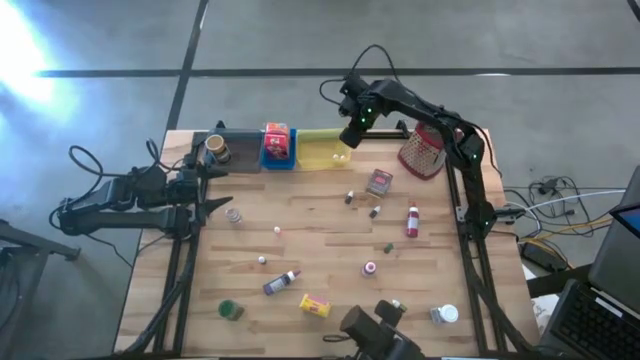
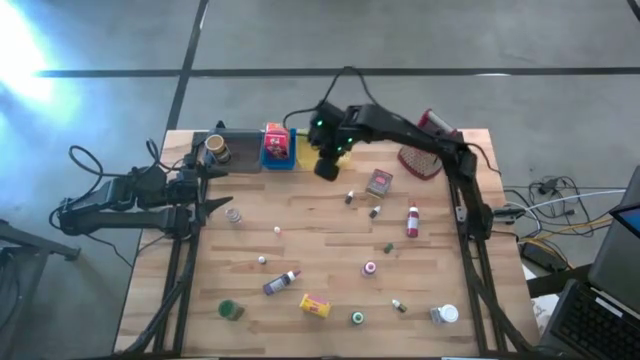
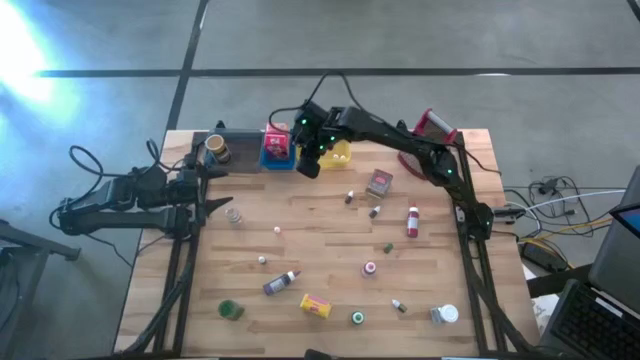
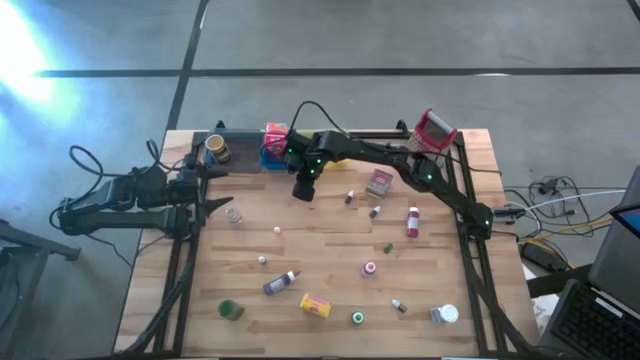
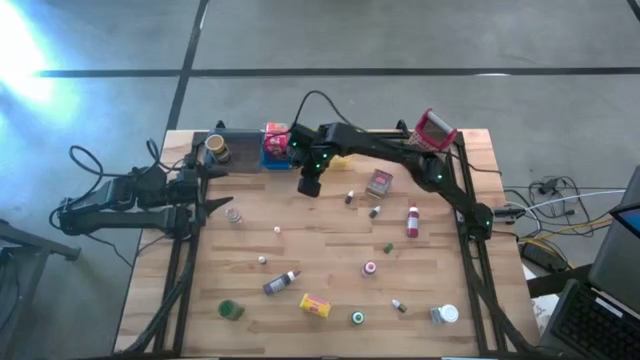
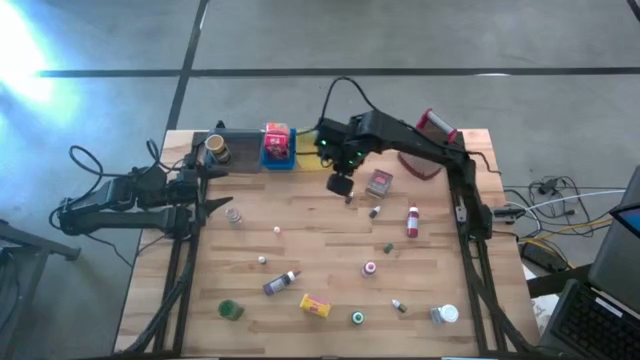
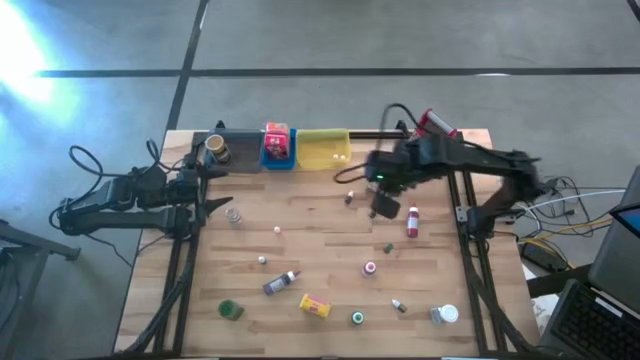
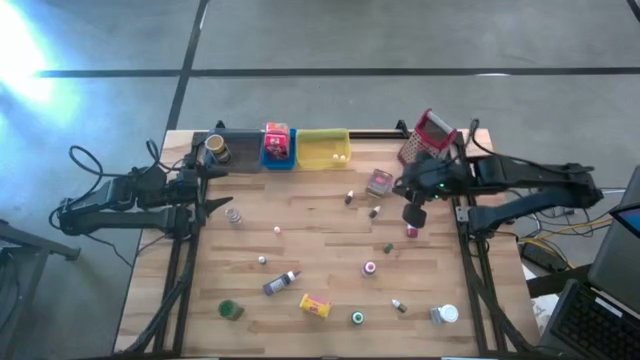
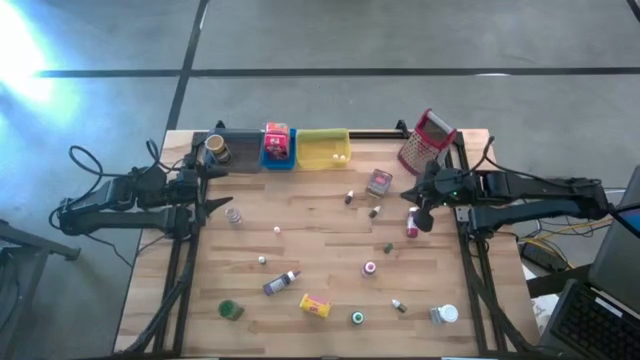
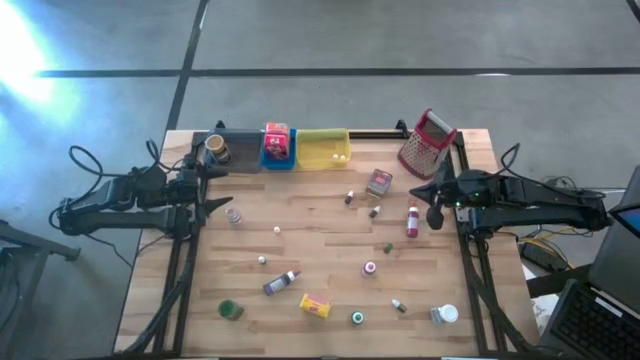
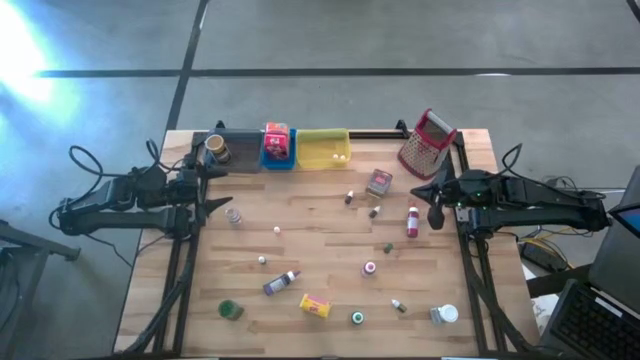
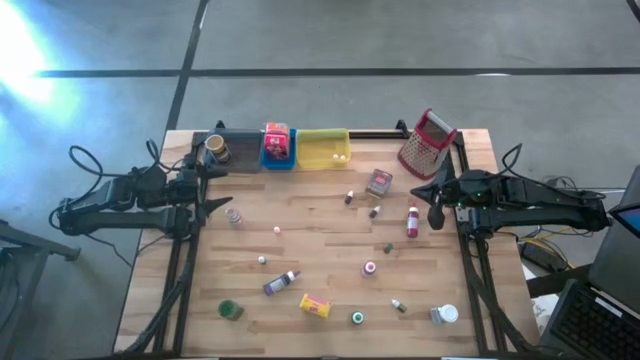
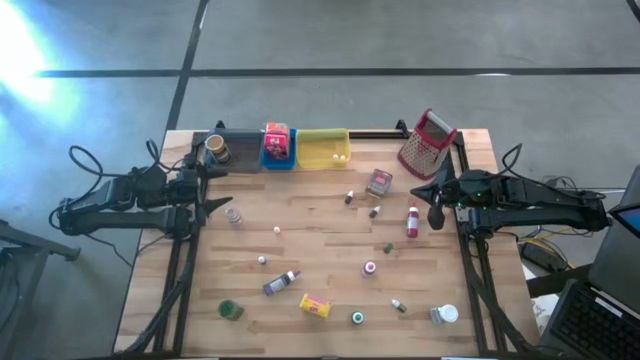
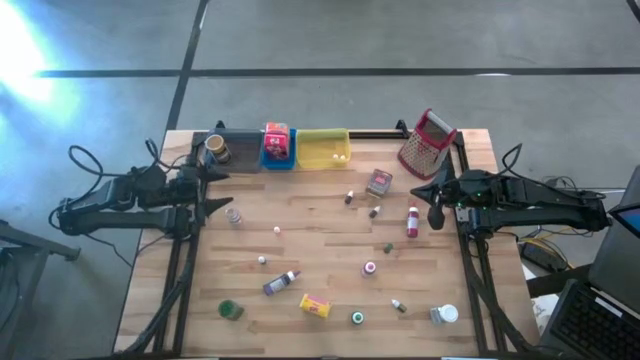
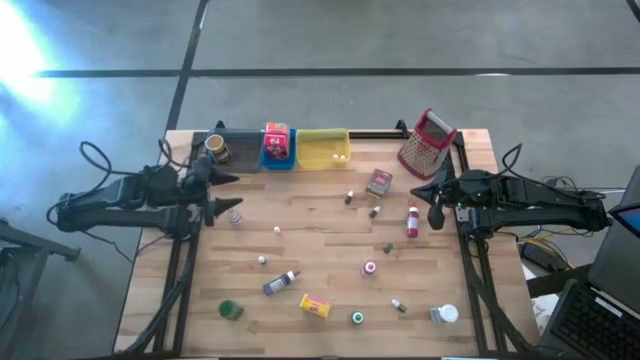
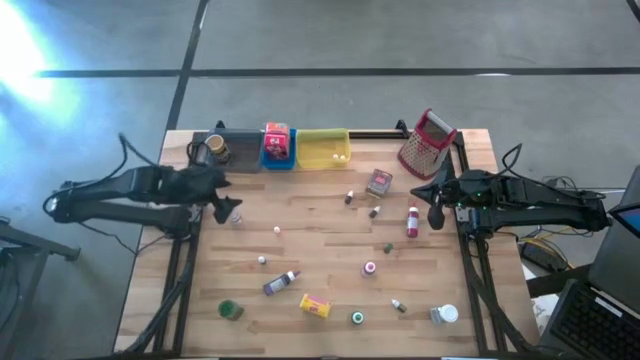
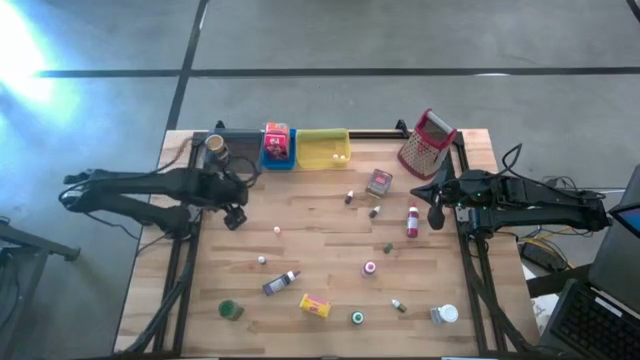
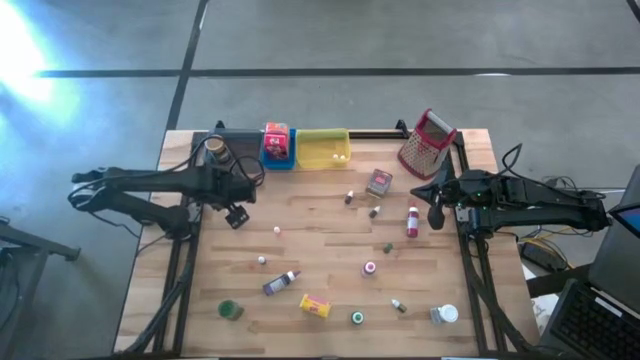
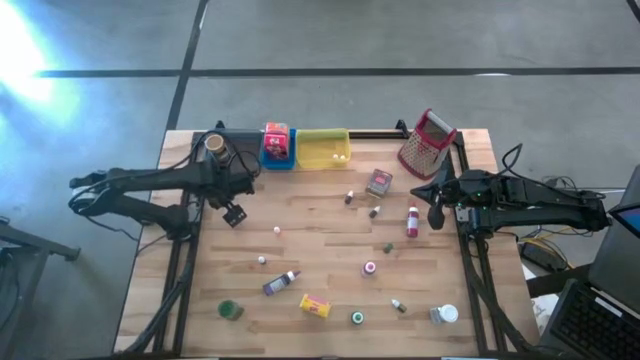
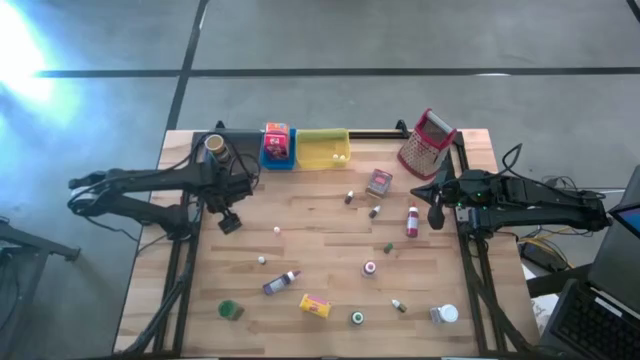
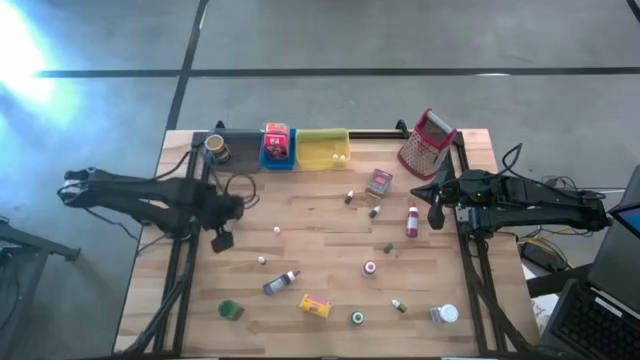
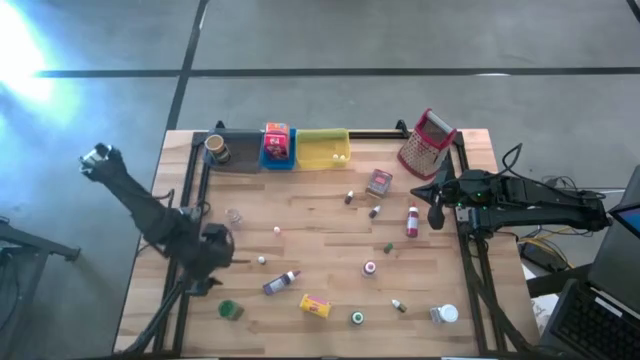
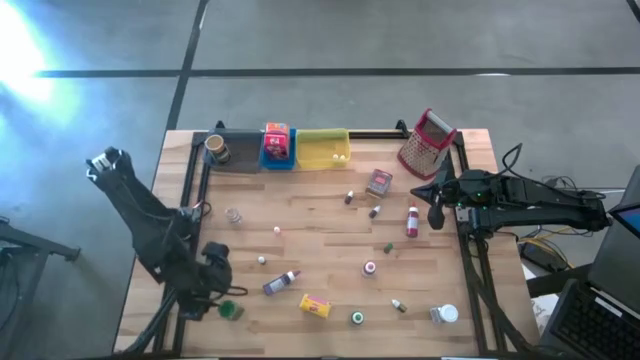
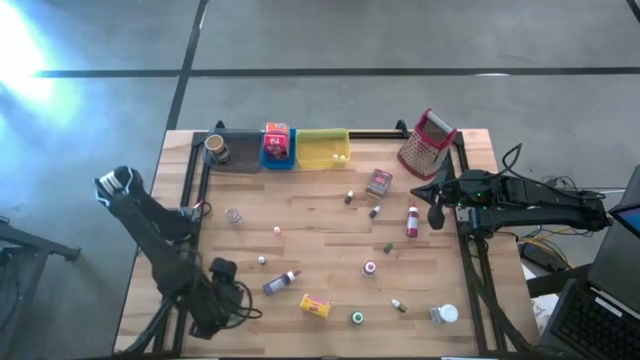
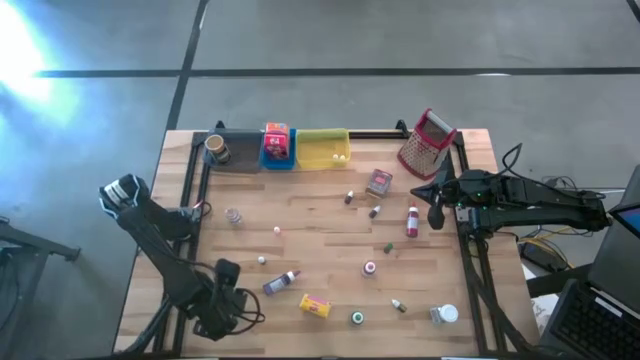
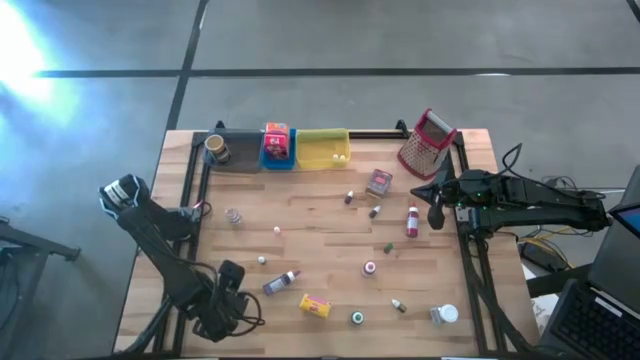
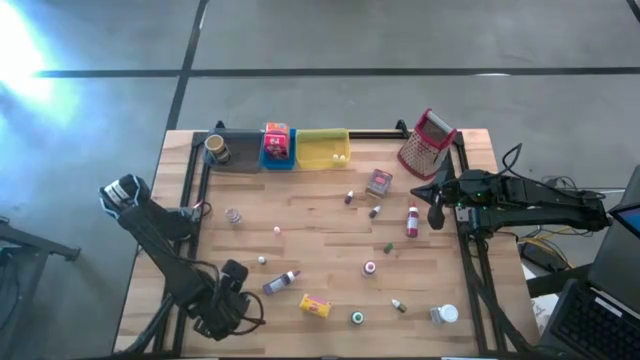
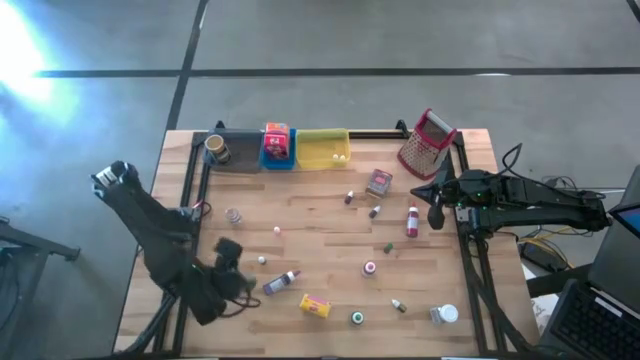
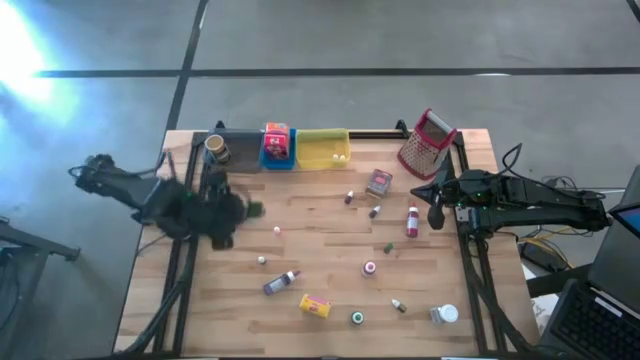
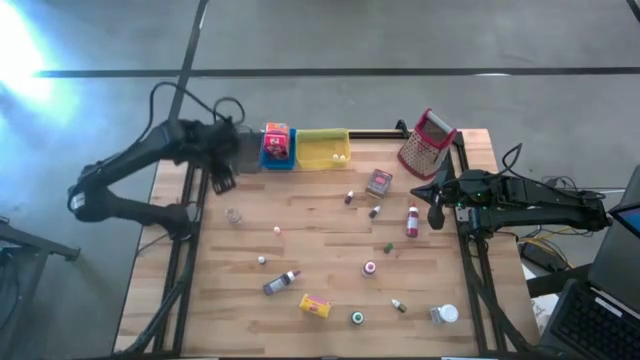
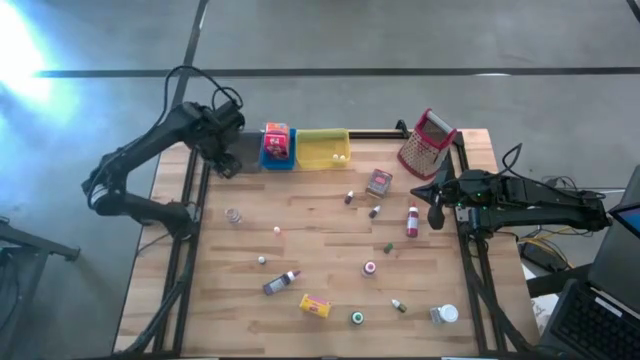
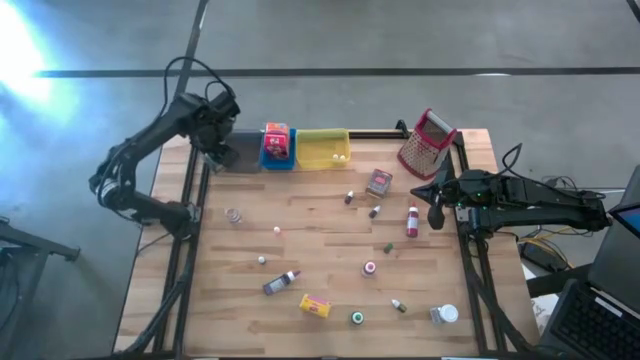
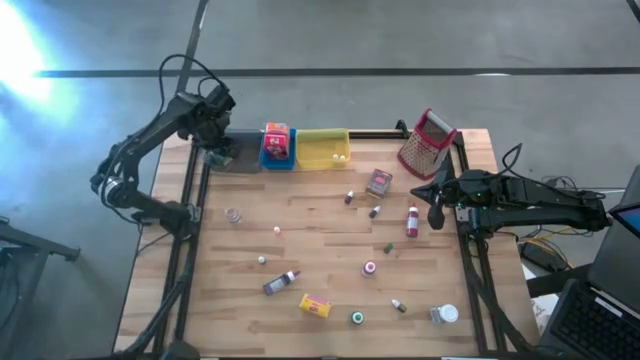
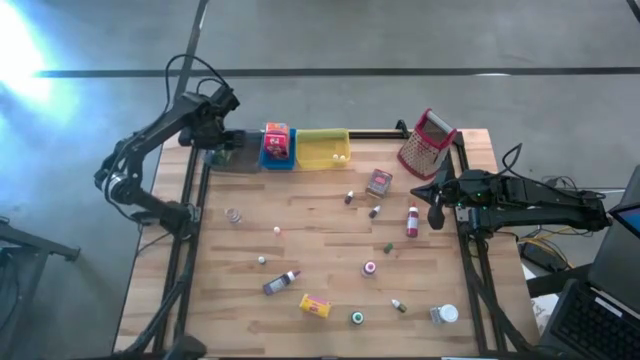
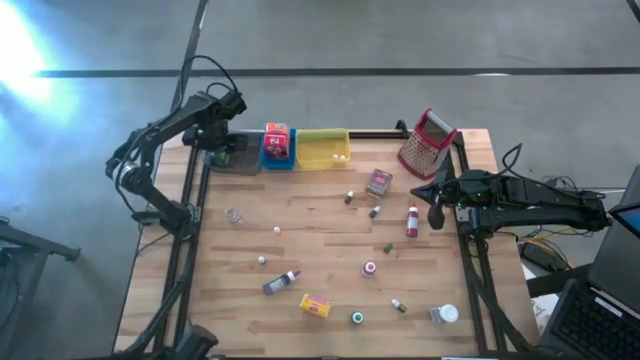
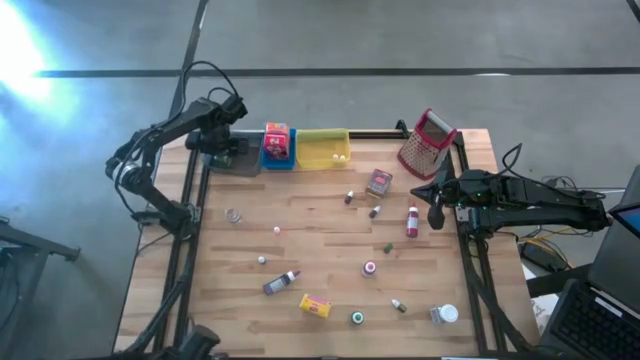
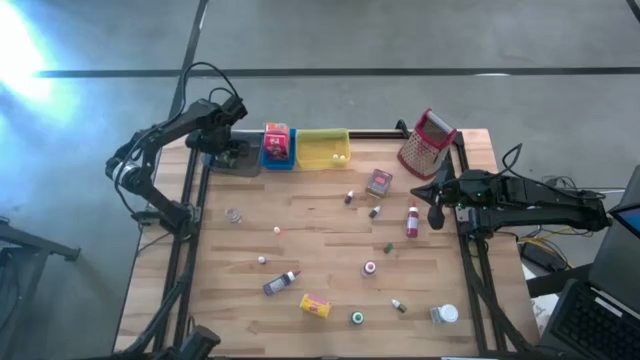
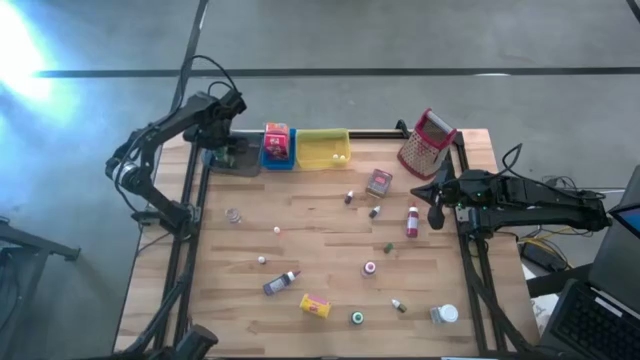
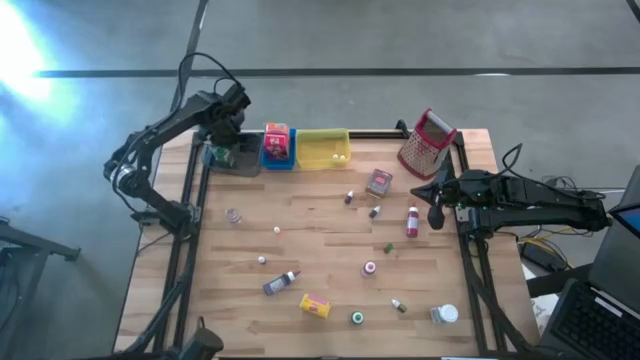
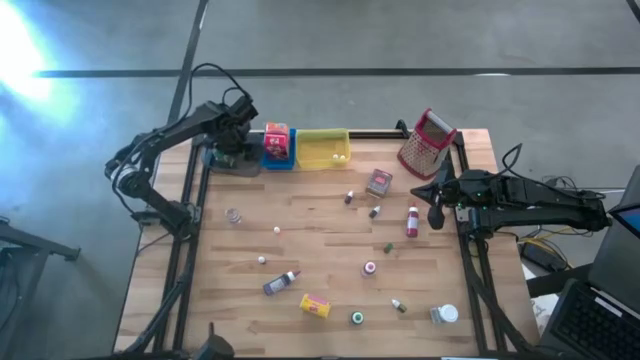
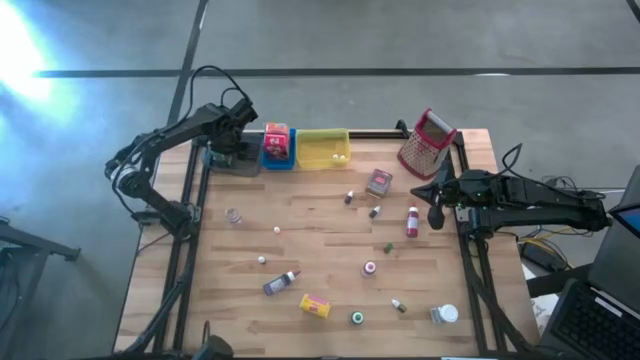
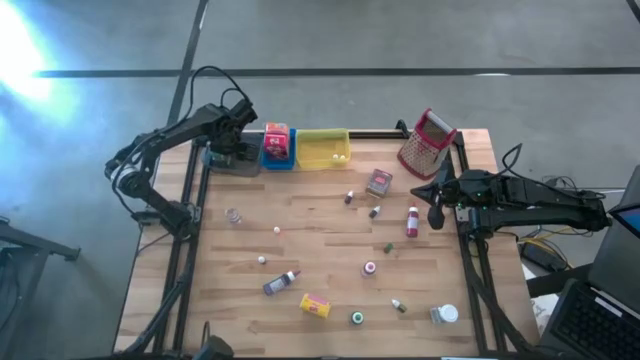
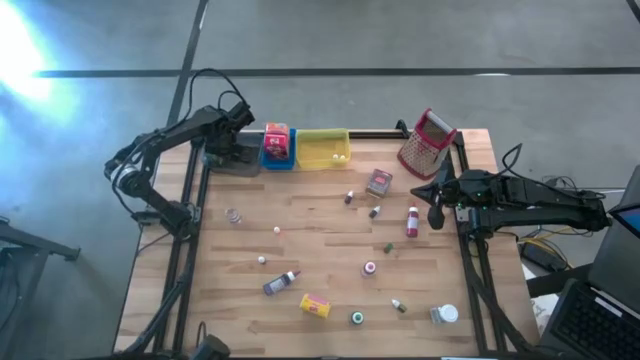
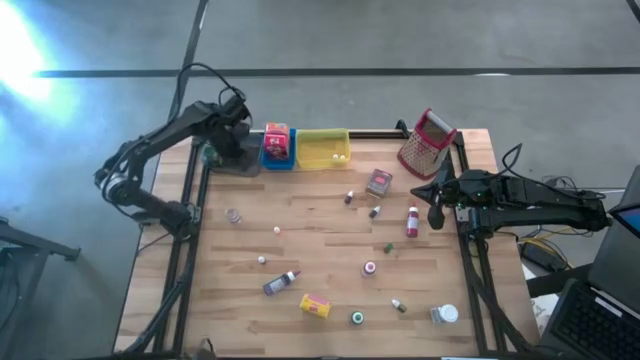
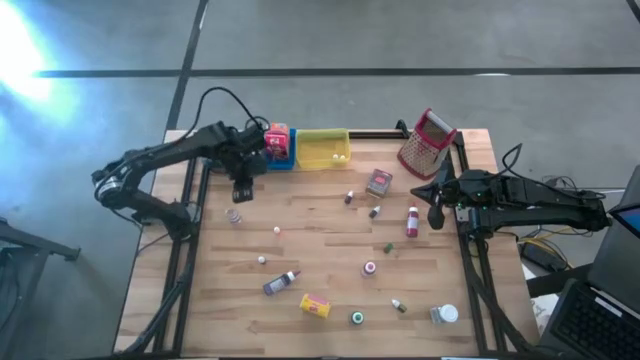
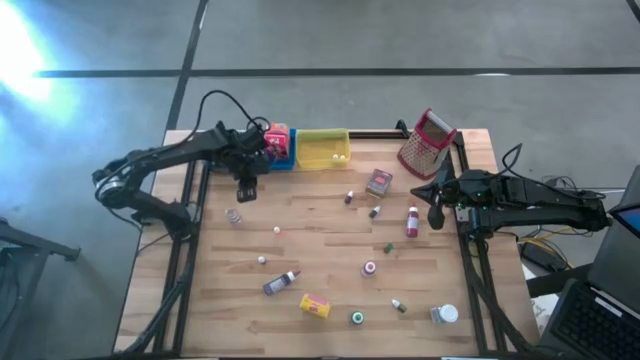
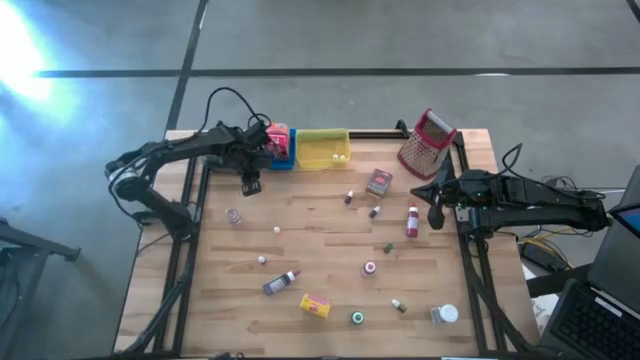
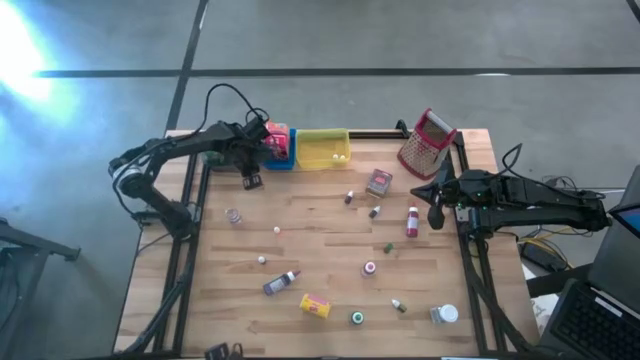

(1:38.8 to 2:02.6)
Task: Pick & Place Kitchen Items
Put the green seasoning bottle into the black bin
